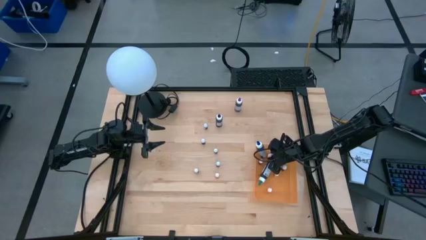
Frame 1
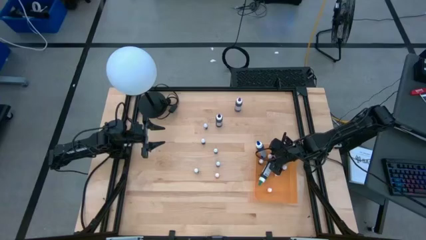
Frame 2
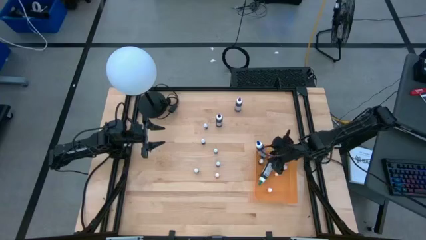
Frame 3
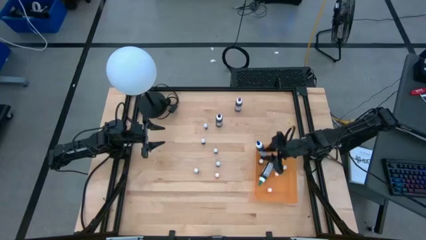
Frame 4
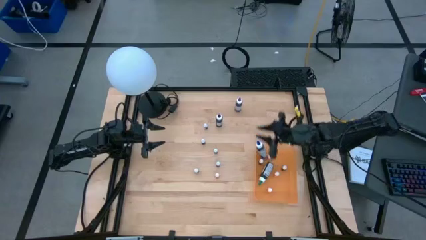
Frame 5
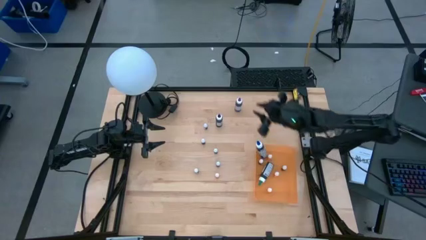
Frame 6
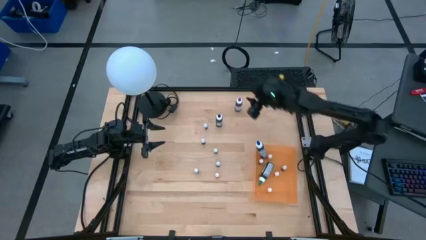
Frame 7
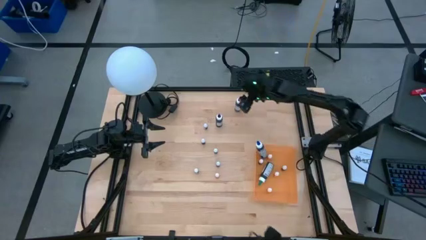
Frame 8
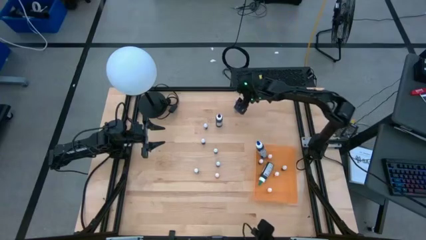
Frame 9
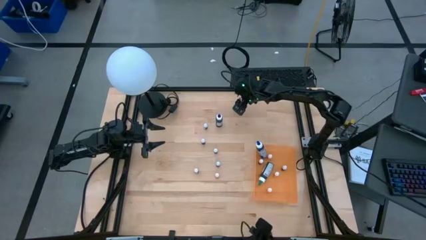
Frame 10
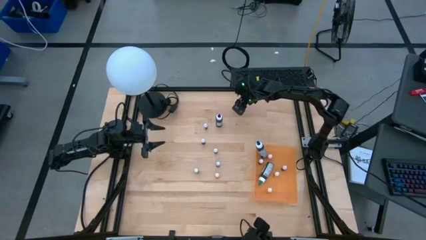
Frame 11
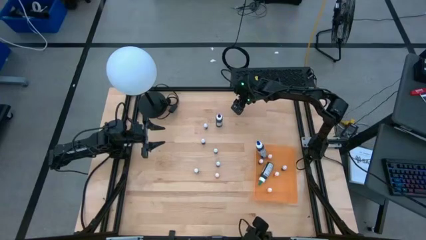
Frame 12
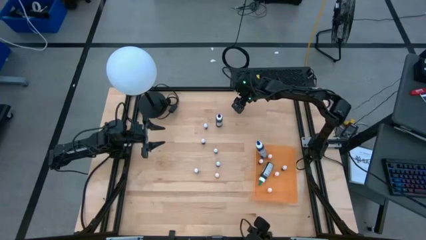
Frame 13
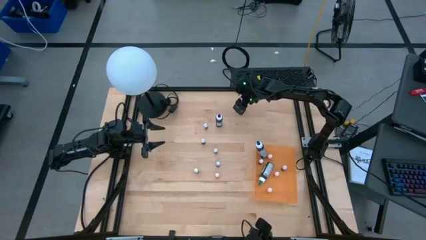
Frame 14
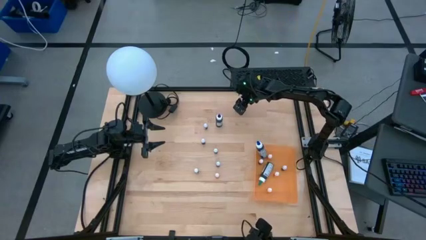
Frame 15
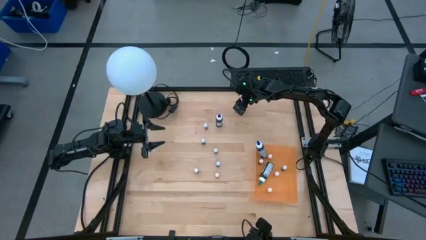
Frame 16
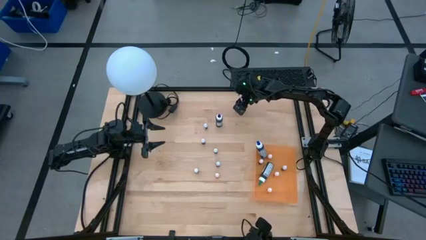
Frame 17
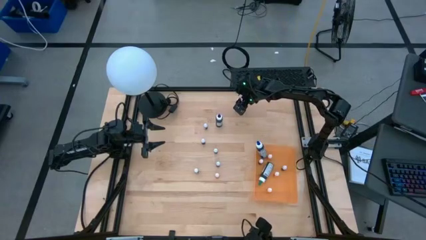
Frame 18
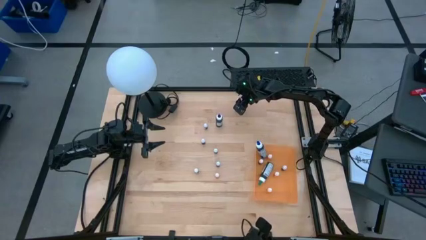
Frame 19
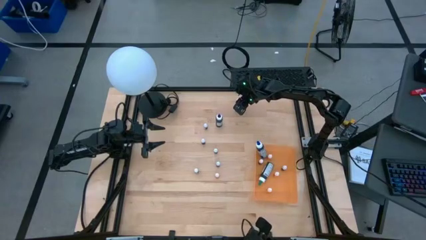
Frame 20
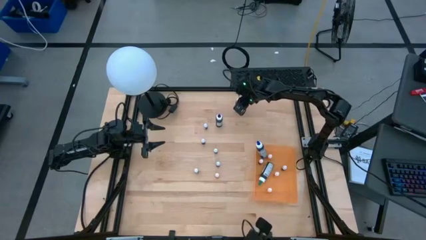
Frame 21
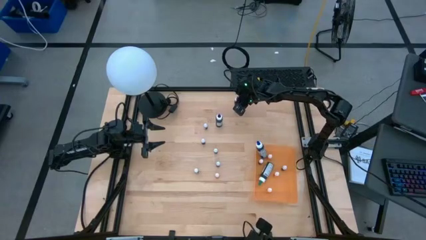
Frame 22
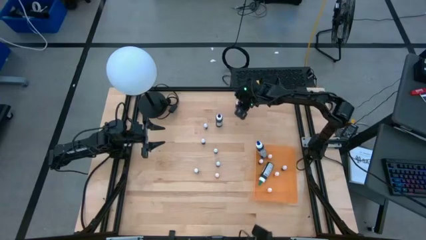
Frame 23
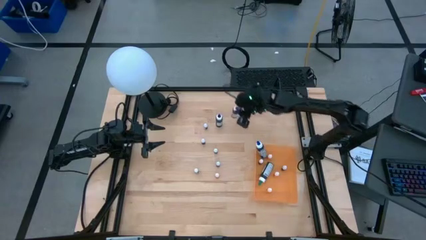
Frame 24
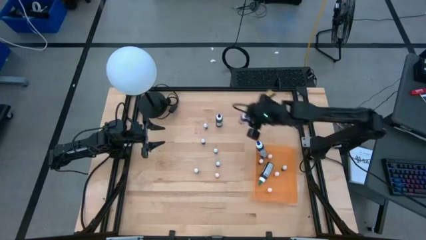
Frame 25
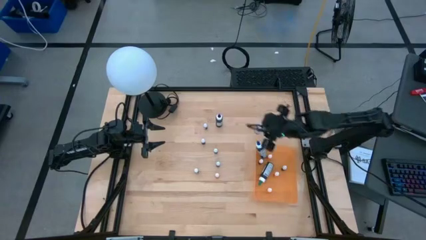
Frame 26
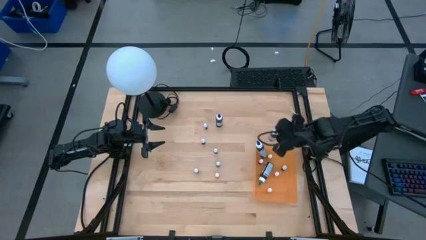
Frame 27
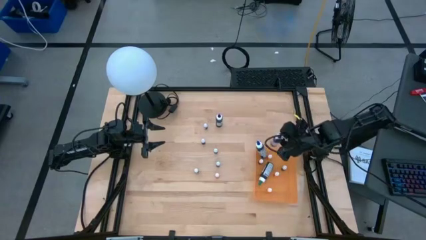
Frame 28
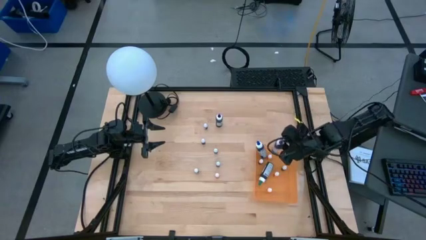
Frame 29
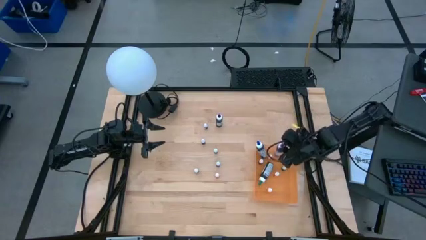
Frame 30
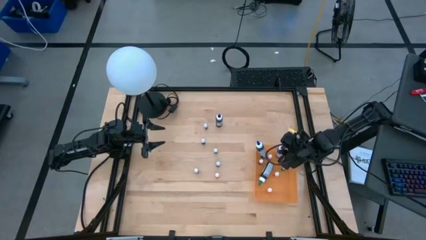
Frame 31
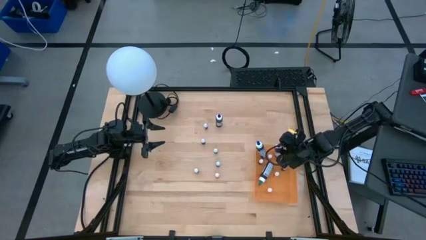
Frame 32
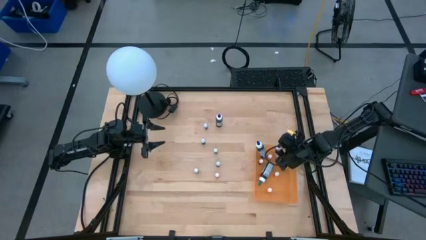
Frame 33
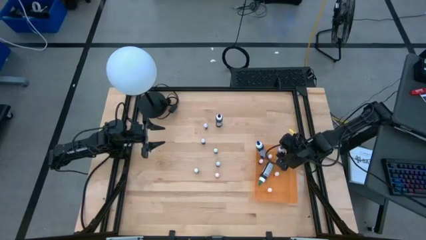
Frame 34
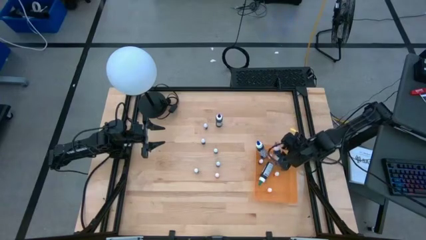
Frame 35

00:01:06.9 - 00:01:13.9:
Task: Pick & Place food coloring
Put the big purple food coloring bottle into the orange bin

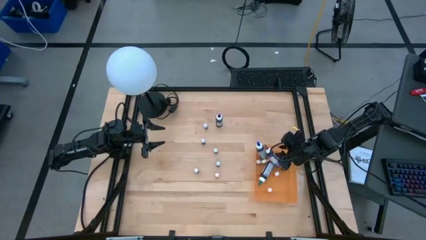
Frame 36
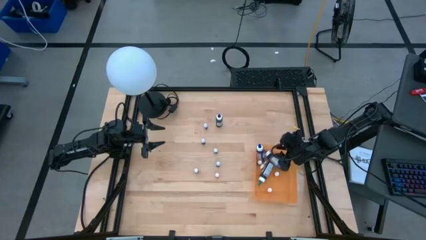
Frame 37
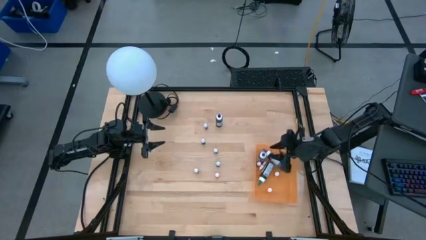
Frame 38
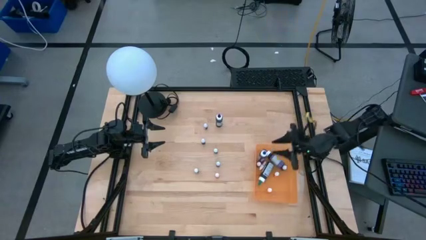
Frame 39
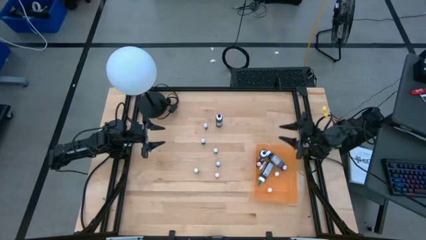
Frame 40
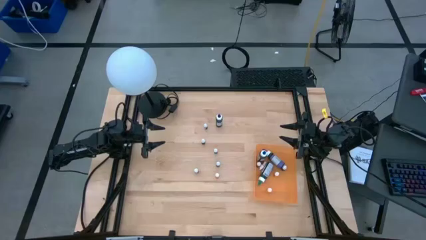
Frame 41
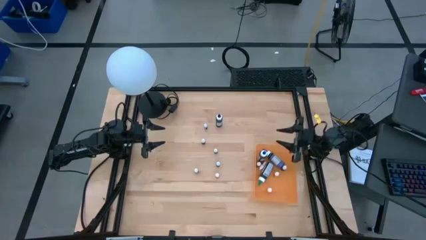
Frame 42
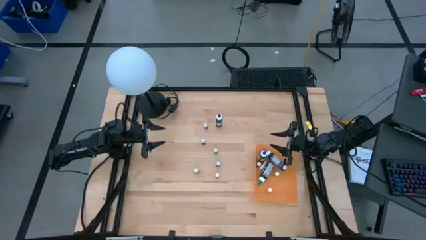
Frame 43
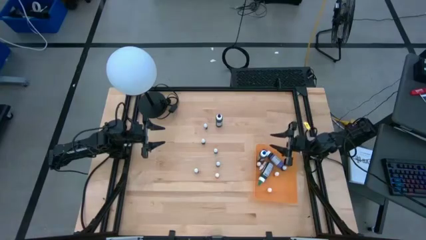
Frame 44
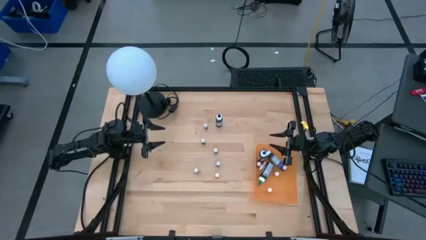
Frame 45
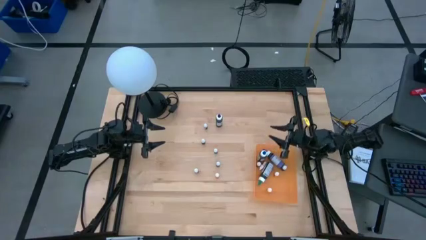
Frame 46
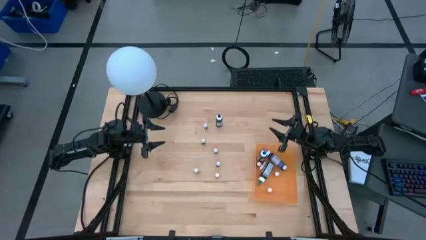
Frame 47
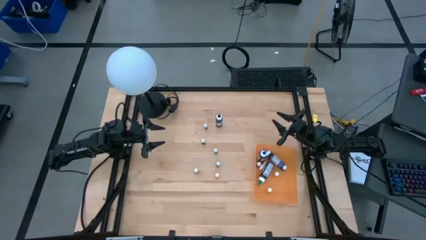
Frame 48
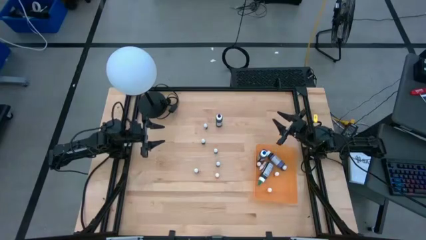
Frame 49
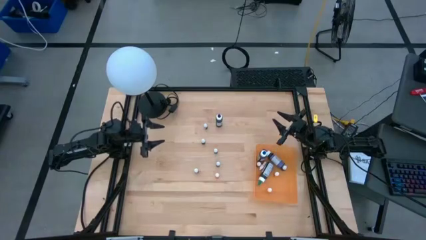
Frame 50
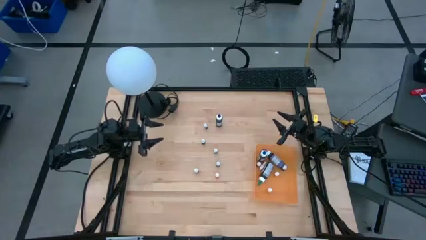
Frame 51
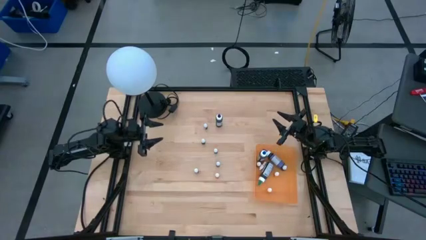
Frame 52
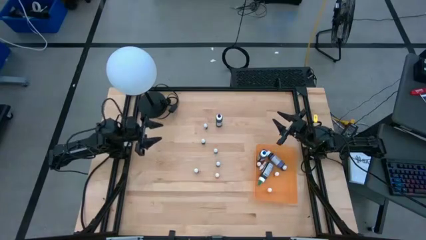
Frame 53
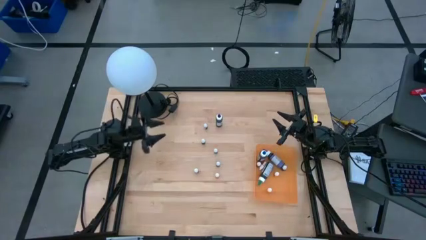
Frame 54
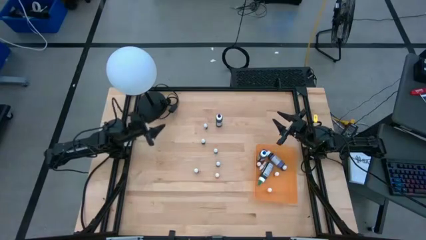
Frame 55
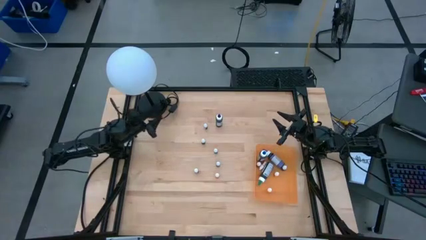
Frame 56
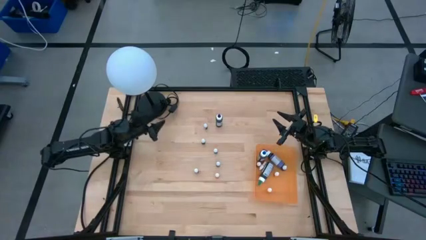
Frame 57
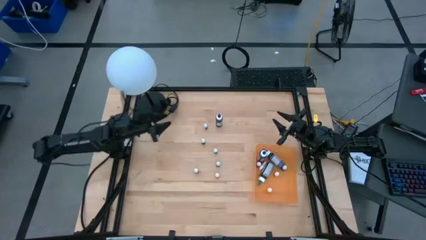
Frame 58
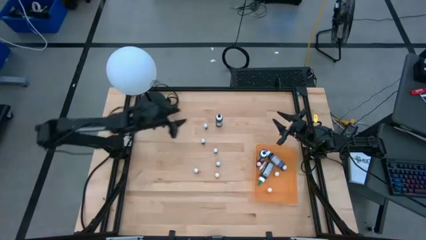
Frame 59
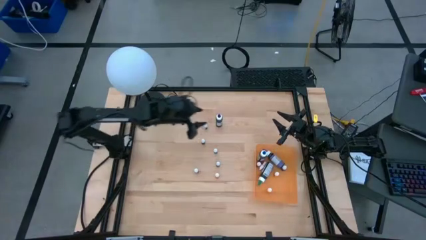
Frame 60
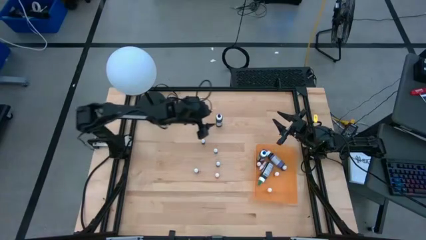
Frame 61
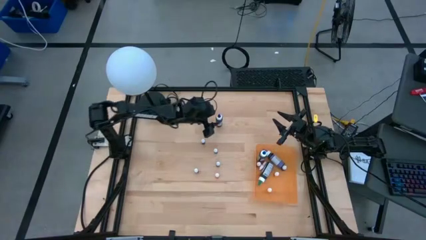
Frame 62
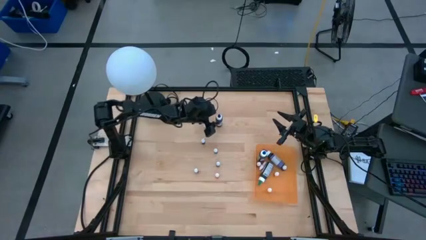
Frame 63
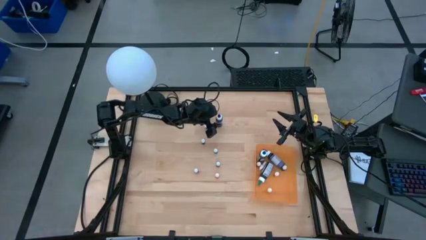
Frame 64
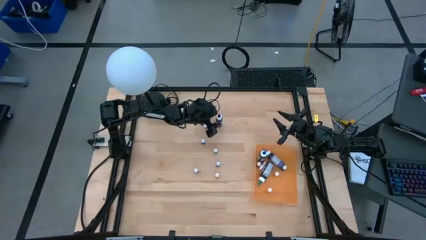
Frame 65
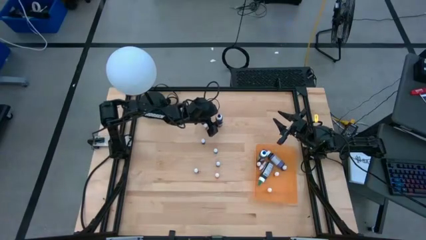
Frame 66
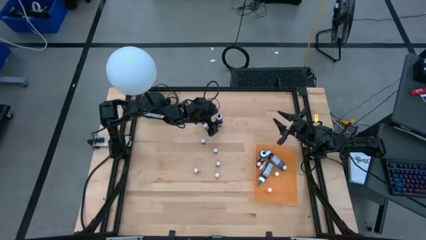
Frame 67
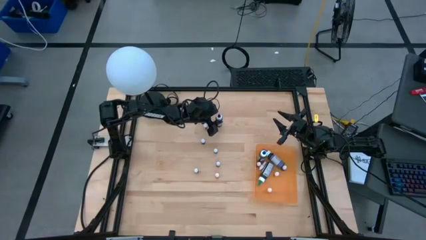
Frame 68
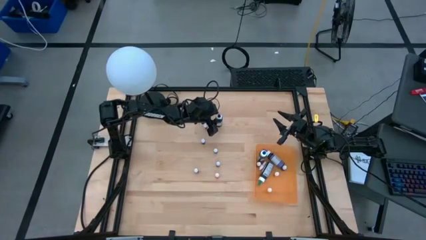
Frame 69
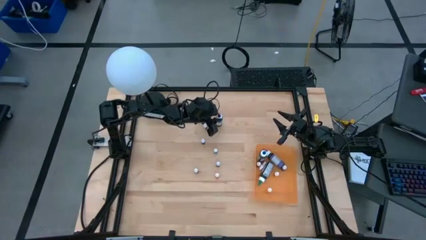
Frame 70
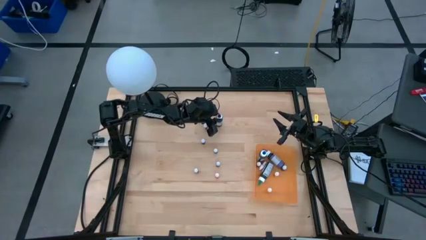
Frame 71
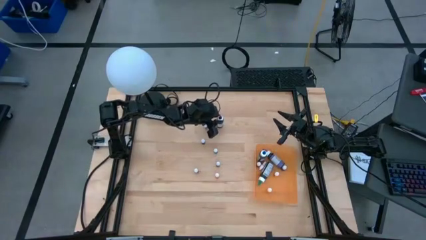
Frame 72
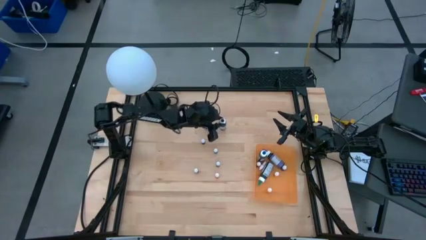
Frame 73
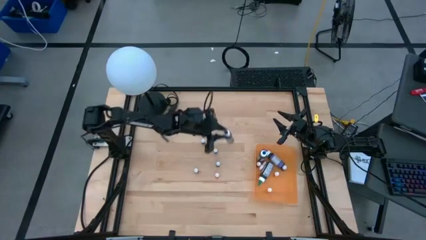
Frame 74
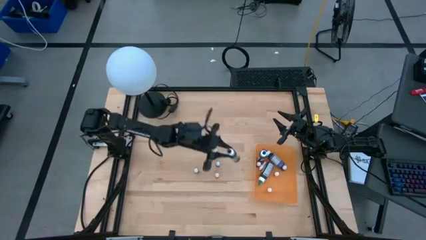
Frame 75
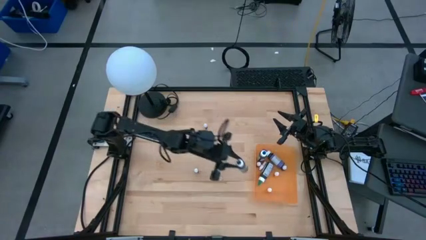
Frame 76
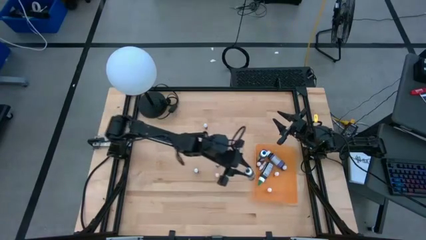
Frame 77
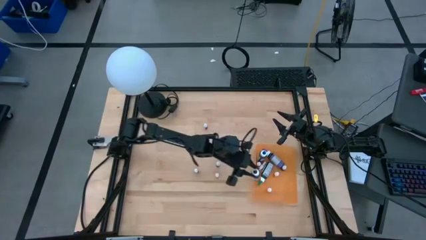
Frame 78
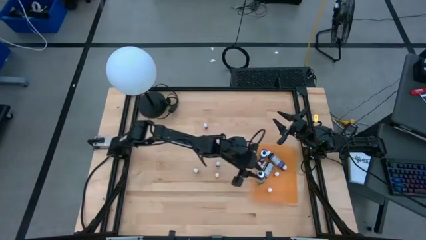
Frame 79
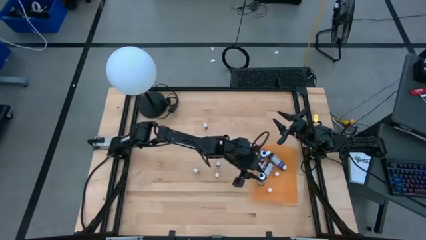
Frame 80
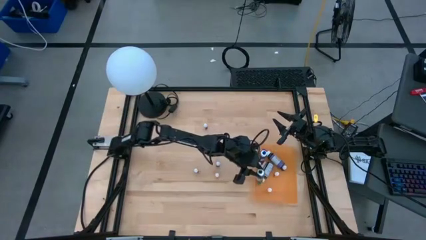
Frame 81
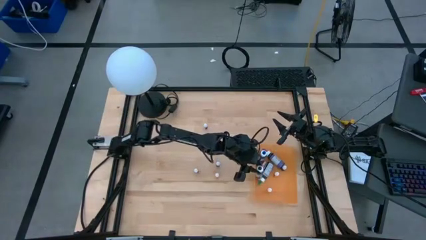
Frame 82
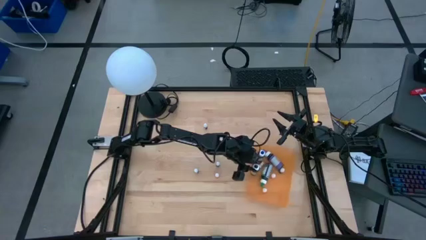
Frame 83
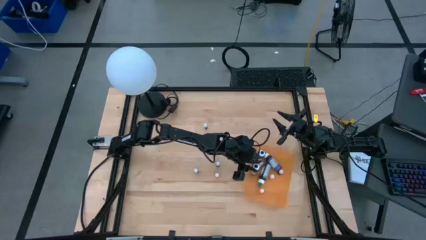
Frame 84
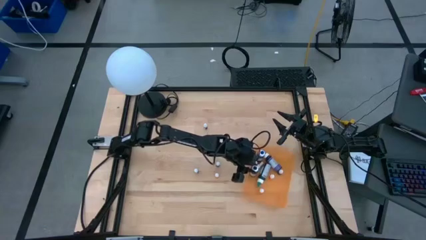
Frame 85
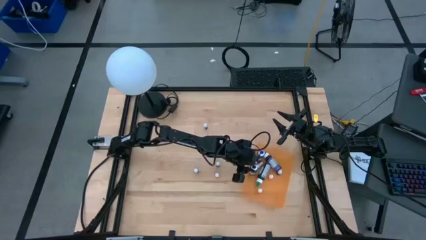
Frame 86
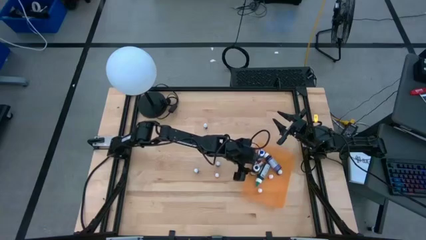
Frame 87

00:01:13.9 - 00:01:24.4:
Put the big black food coloring bottle into the orange bin
